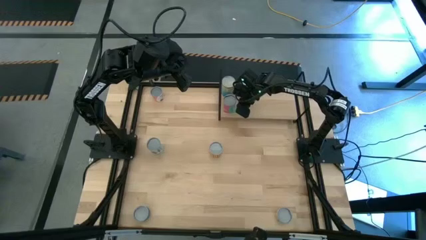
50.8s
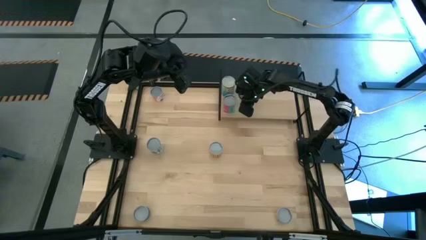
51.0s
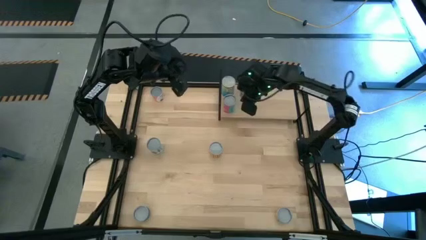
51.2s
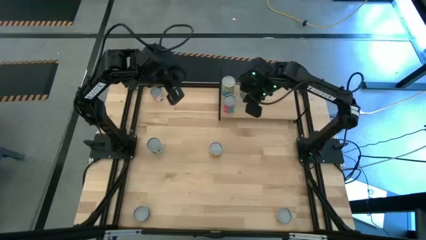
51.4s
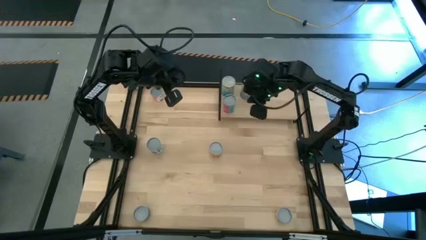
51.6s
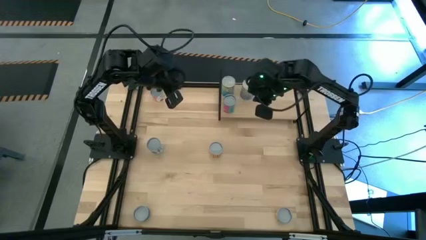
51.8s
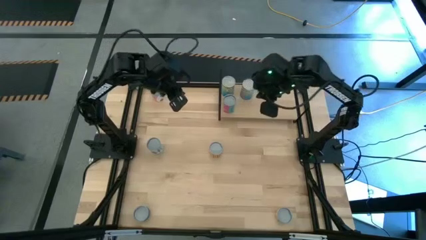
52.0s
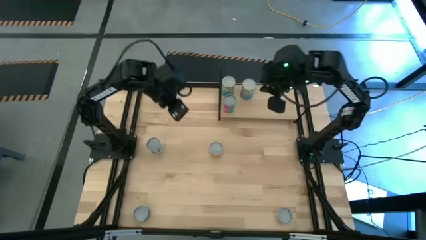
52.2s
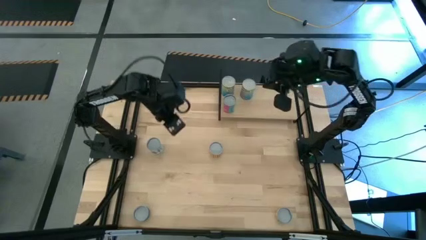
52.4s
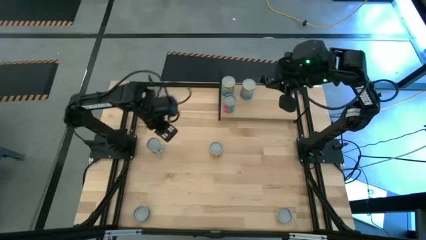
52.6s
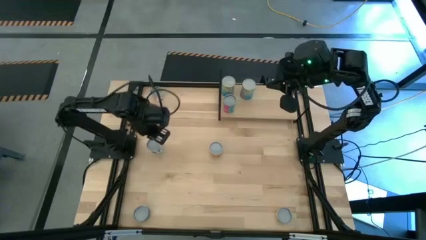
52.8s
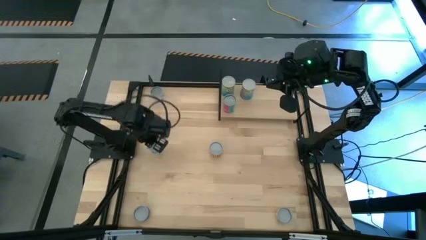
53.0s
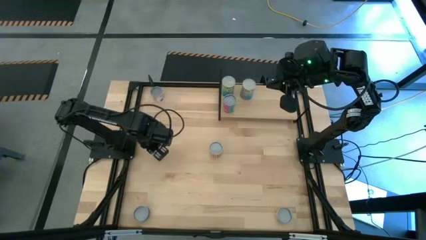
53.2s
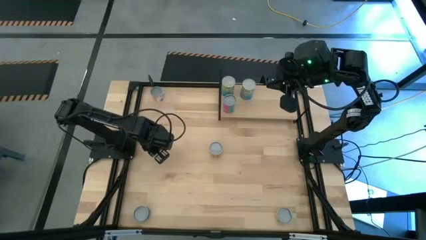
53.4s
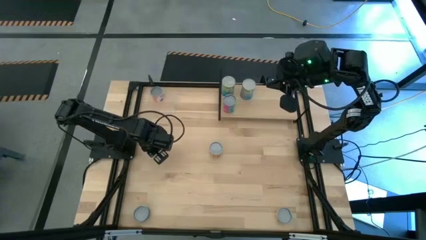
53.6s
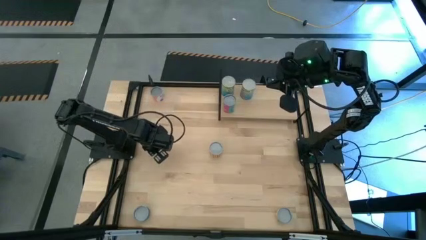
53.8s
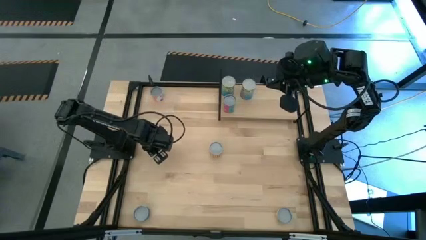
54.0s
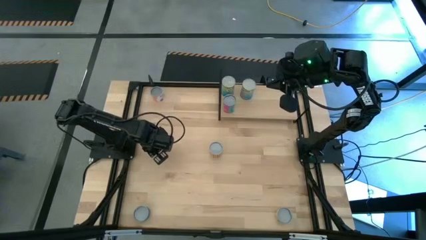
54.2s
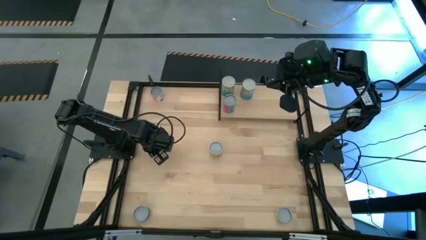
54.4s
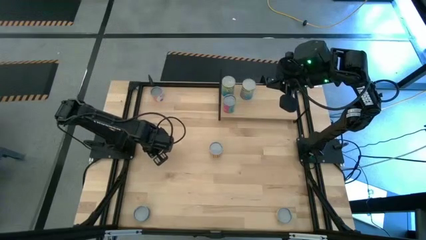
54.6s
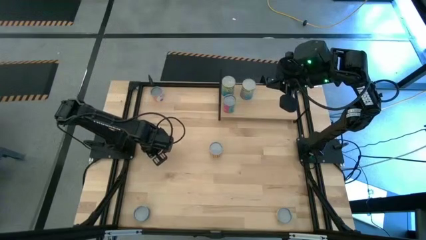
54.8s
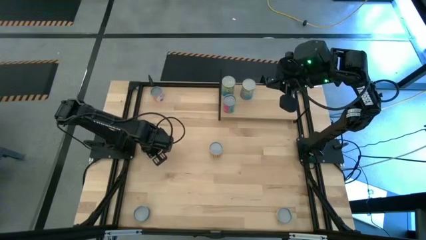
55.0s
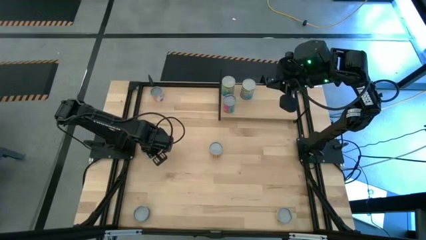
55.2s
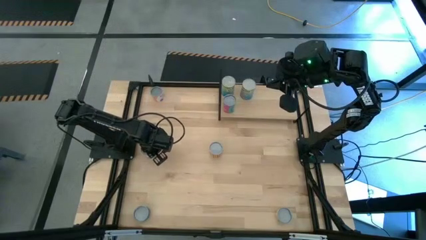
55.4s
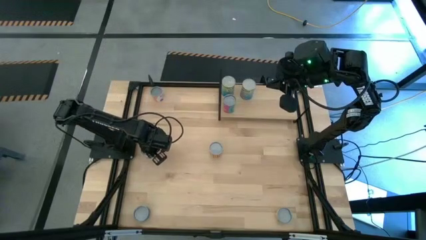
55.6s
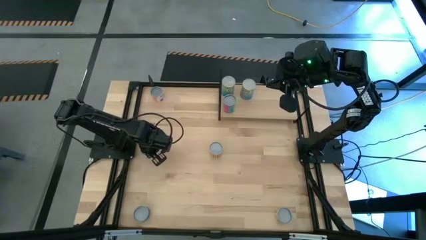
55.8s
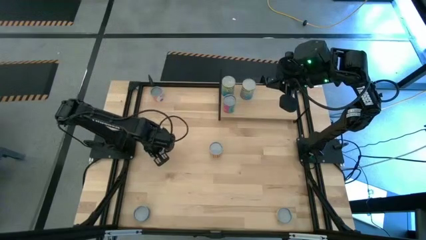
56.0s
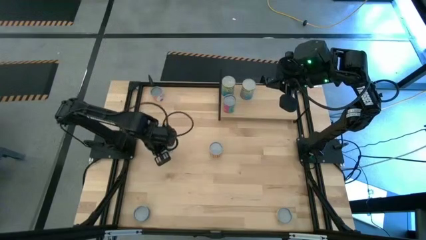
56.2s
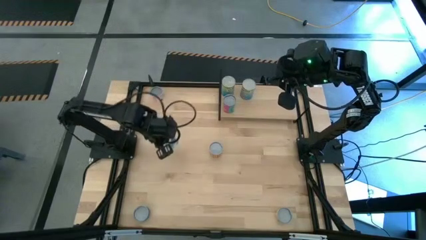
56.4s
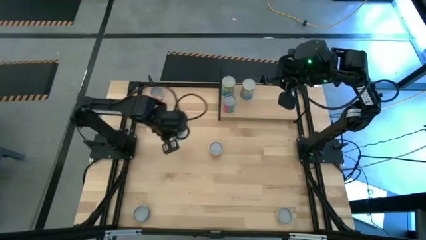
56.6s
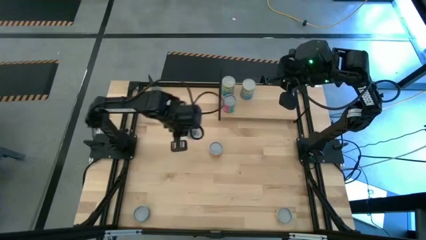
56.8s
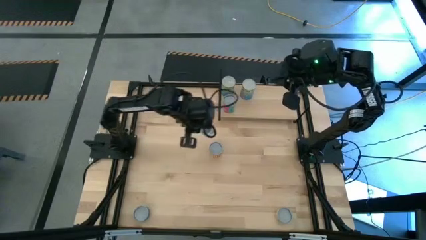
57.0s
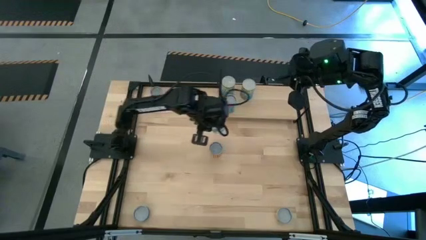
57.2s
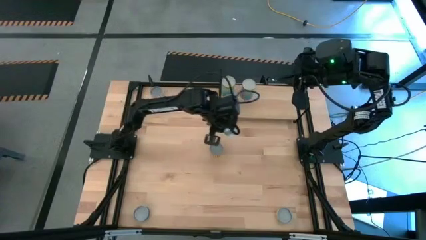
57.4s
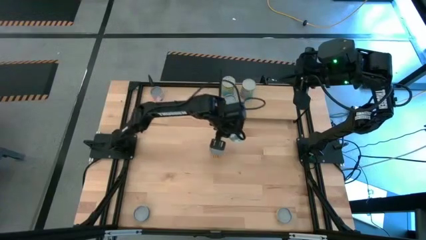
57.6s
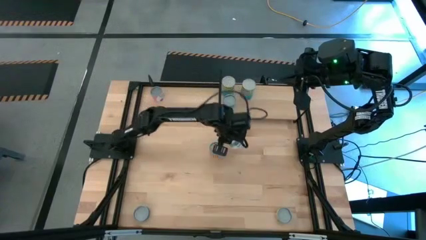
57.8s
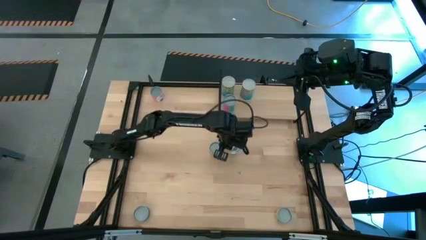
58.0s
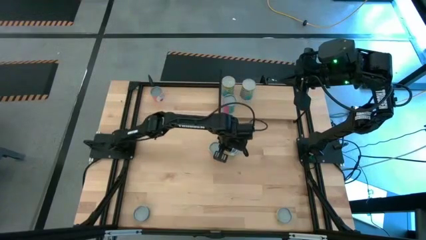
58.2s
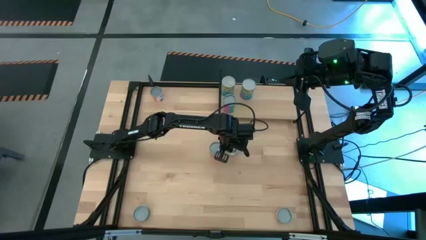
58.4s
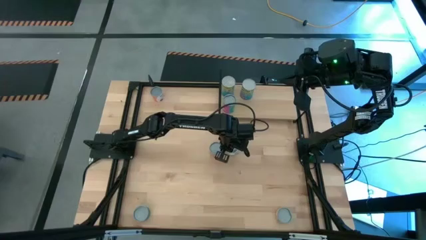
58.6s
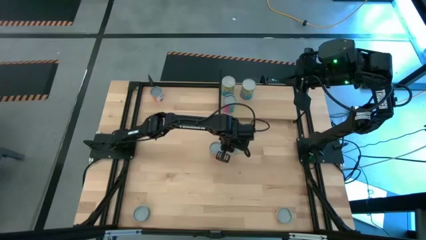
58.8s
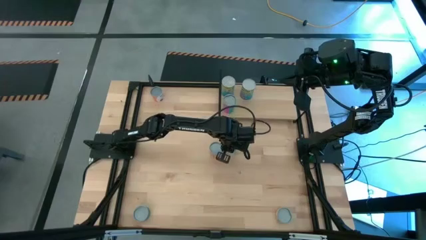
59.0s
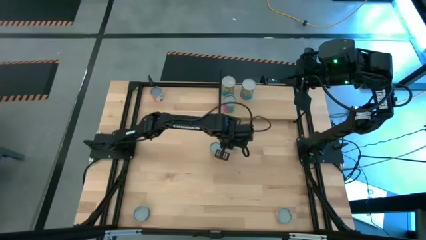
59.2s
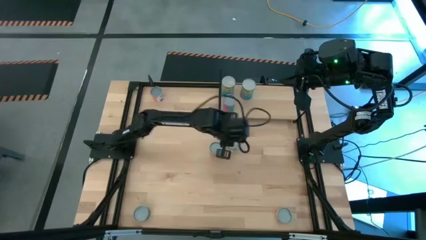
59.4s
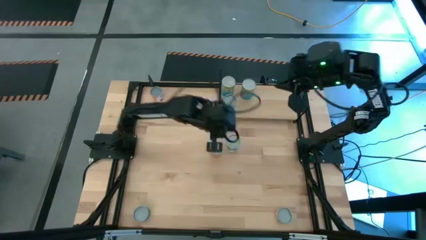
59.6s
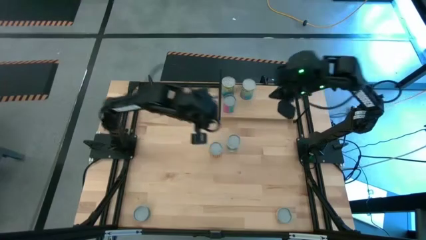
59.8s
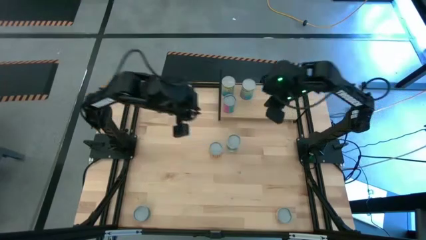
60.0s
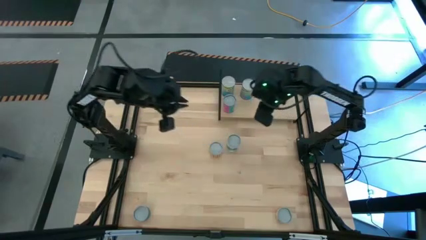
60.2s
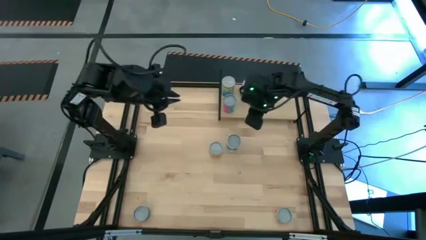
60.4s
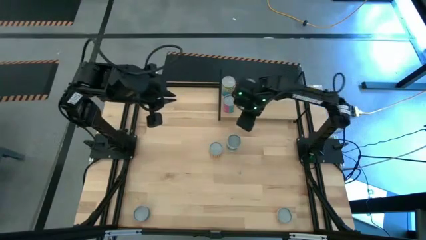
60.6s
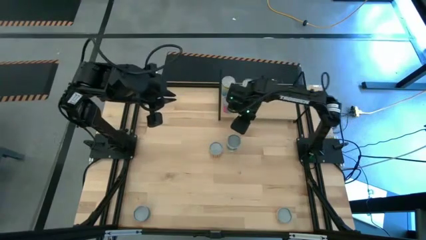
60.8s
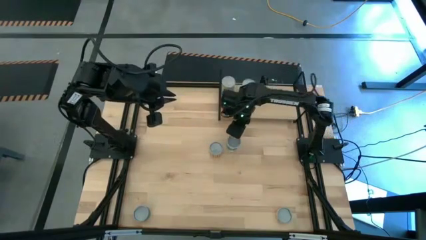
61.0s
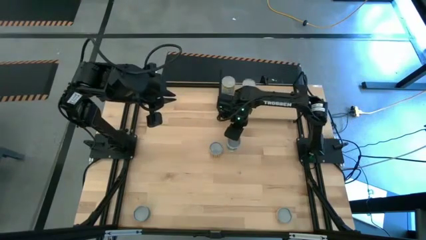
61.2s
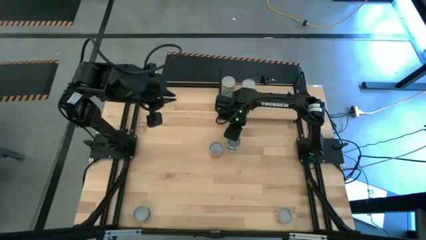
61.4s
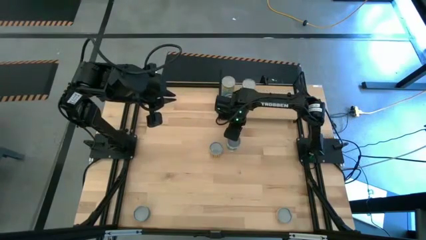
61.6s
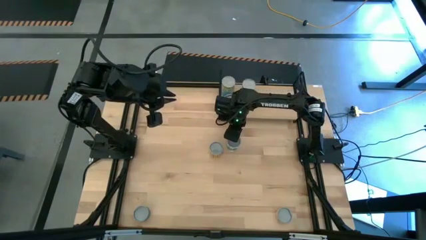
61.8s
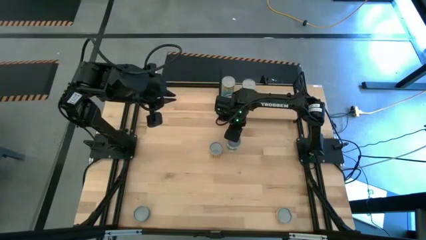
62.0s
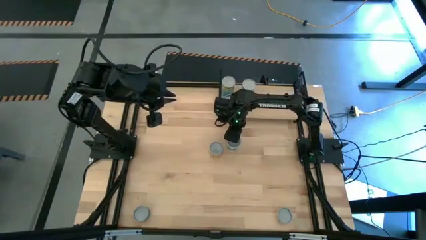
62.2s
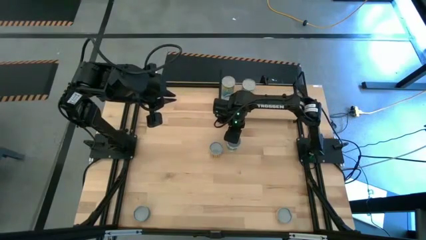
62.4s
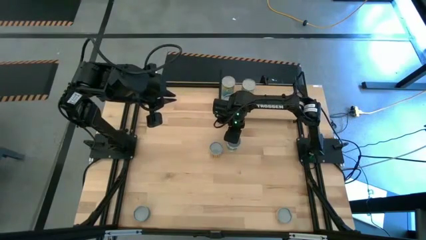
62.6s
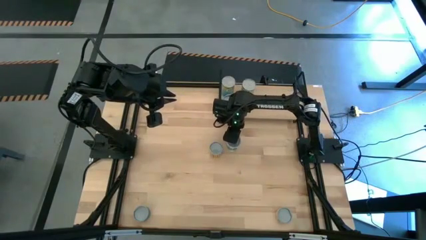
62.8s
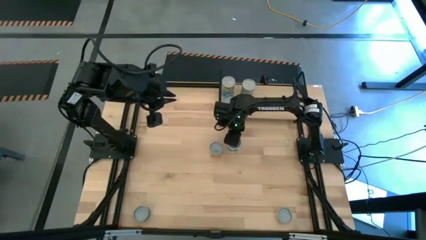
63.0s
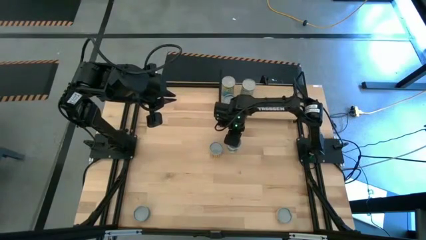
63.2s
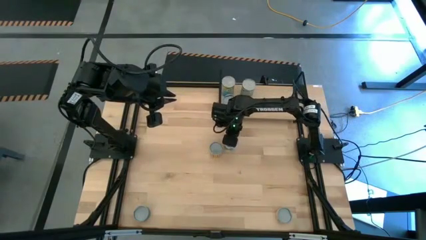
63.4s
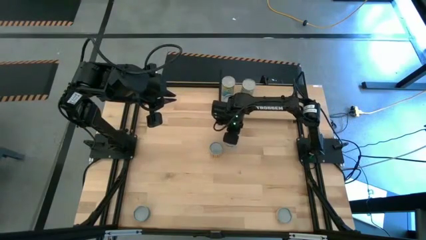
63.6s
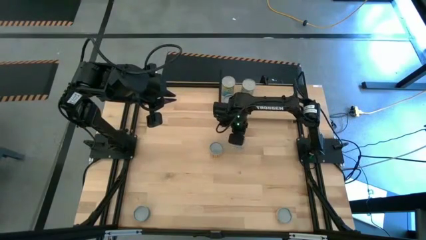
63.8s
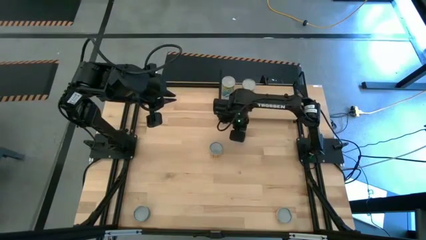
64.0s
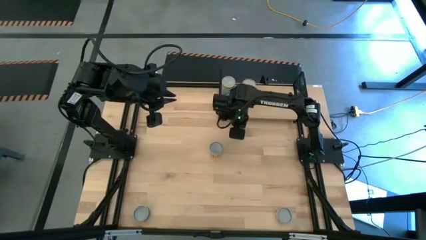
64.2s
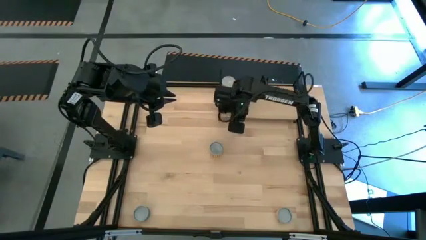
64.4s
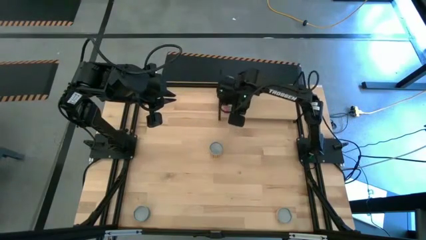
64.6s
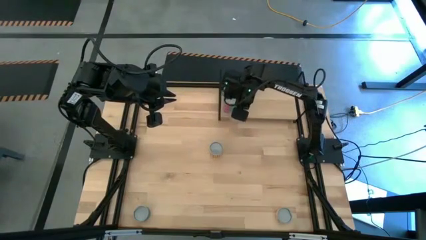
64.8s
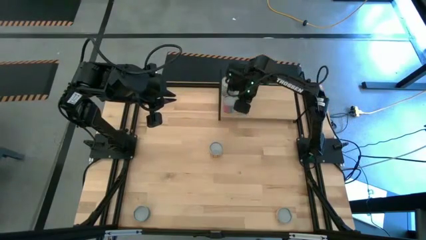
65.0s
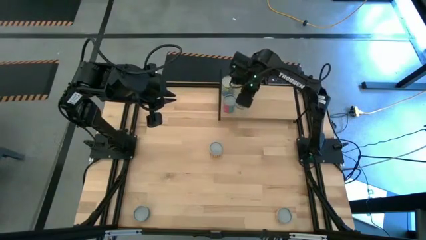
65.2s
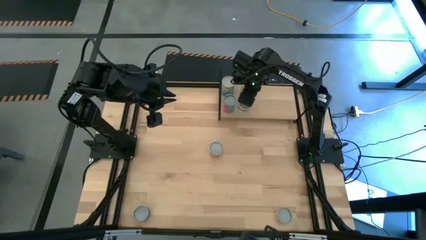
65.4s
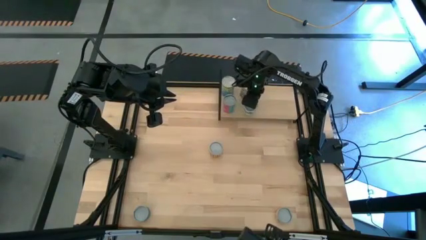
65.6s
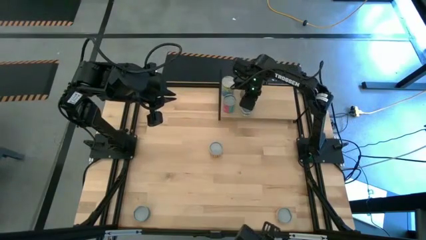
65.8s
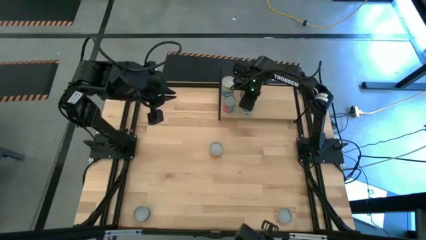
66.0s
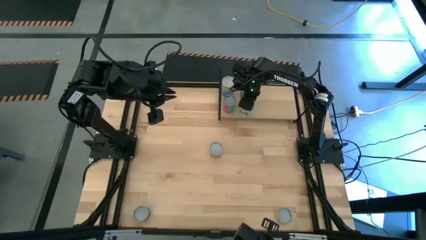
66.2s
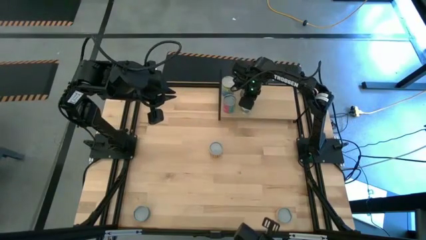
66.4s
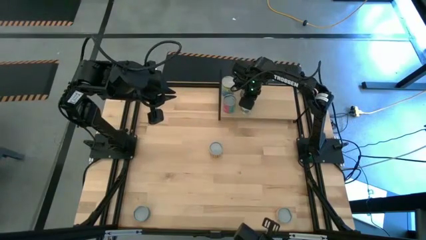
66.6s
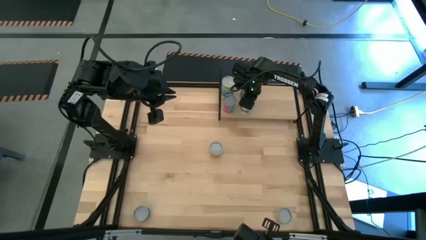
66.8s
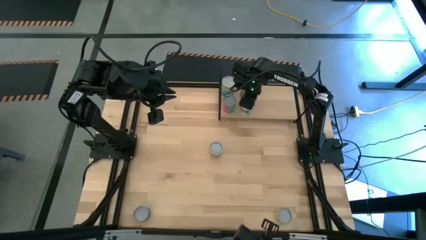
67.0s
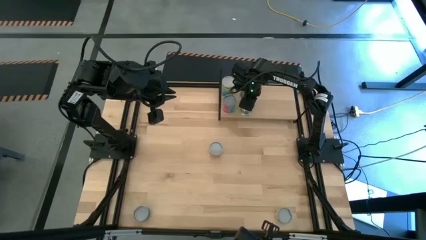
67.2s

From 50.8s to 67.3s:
Task: Pick and place cans onto a shelf
Put the canned mixed vegetables on the shelf
